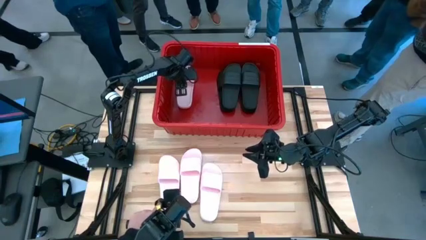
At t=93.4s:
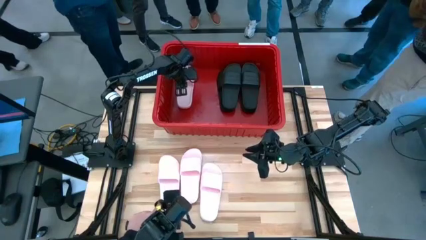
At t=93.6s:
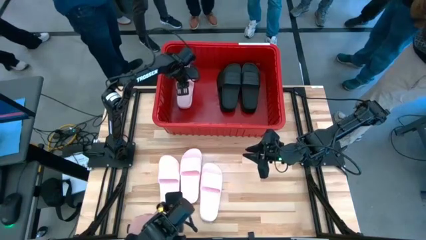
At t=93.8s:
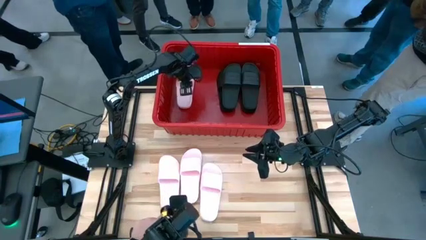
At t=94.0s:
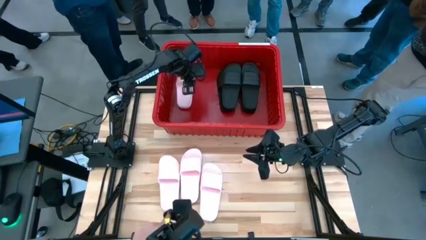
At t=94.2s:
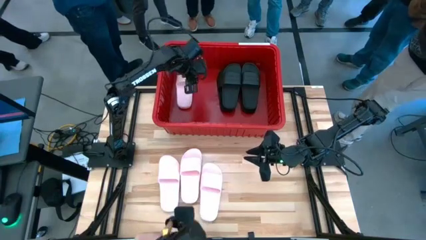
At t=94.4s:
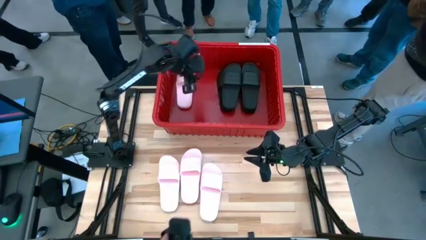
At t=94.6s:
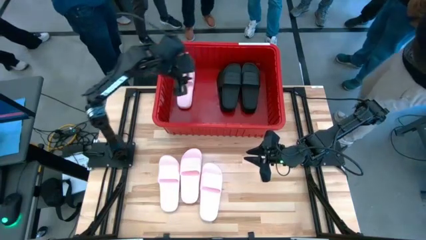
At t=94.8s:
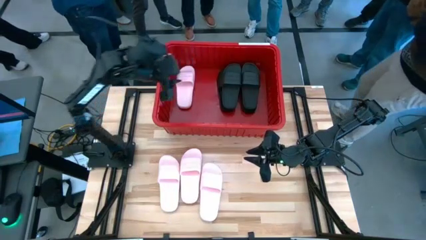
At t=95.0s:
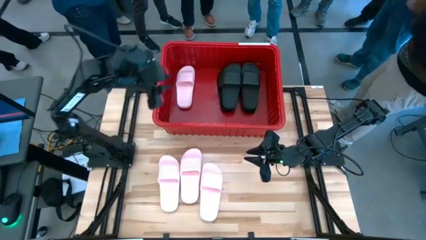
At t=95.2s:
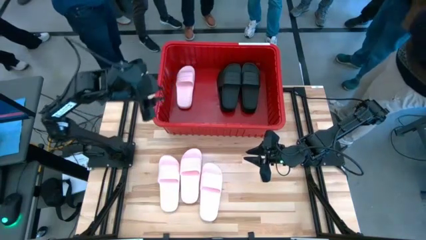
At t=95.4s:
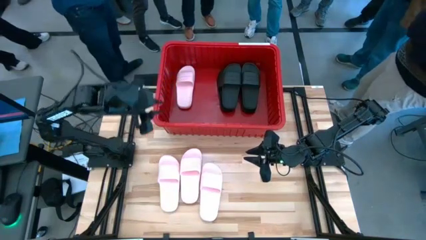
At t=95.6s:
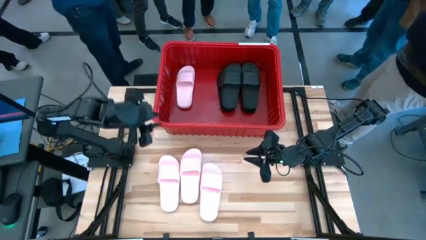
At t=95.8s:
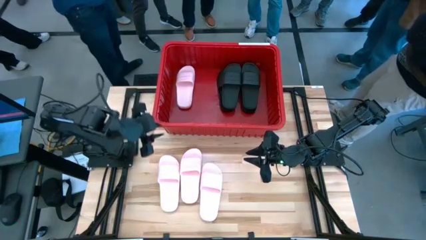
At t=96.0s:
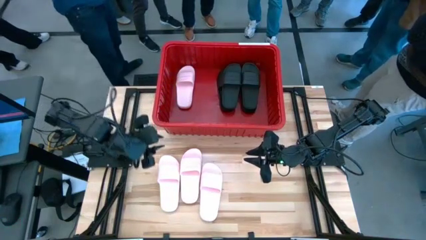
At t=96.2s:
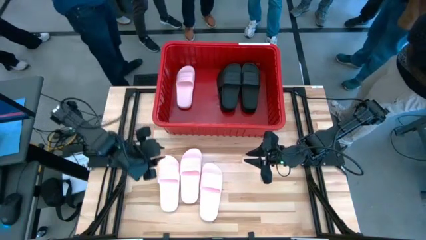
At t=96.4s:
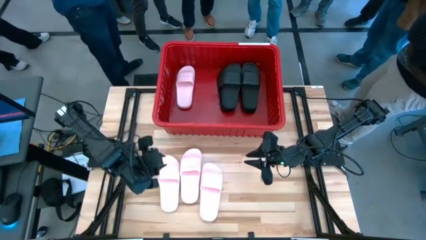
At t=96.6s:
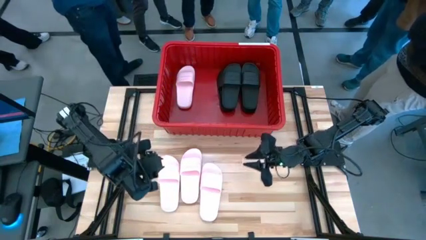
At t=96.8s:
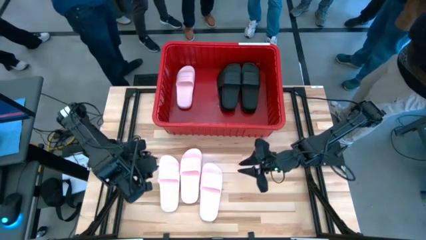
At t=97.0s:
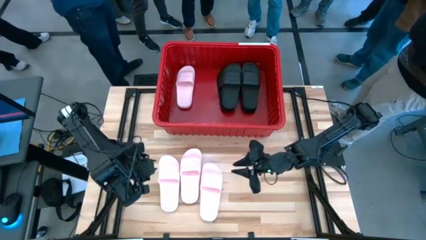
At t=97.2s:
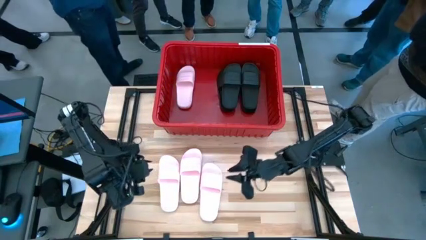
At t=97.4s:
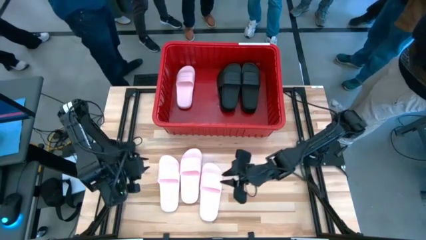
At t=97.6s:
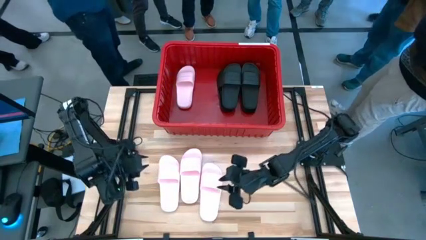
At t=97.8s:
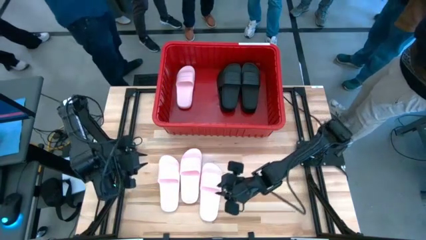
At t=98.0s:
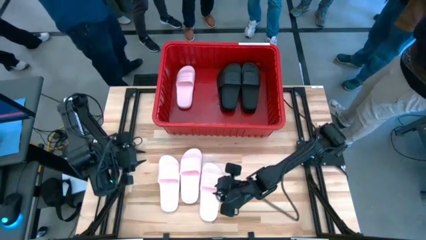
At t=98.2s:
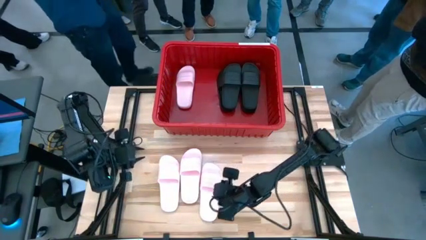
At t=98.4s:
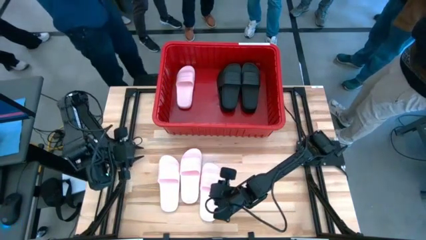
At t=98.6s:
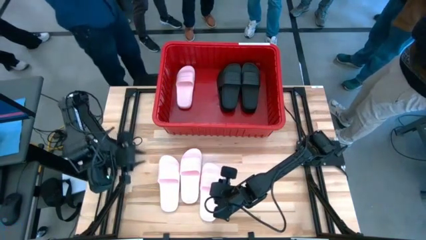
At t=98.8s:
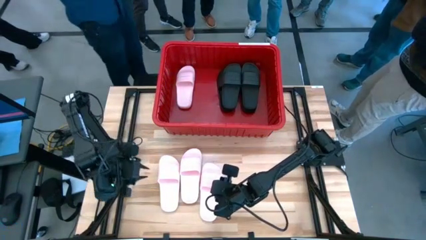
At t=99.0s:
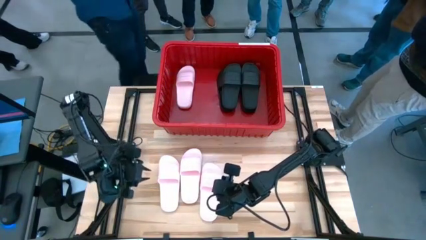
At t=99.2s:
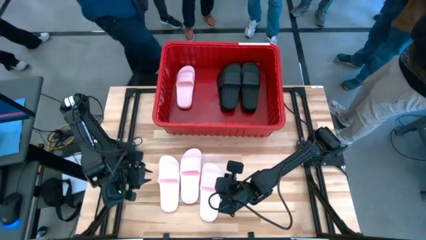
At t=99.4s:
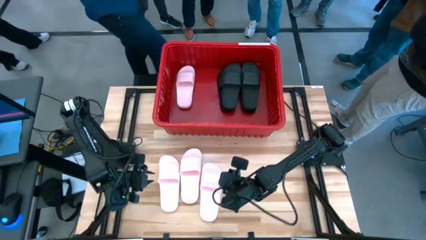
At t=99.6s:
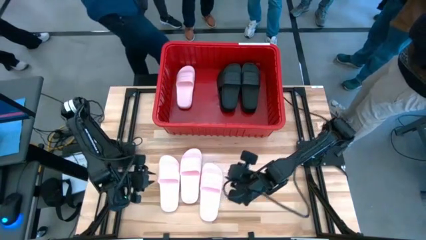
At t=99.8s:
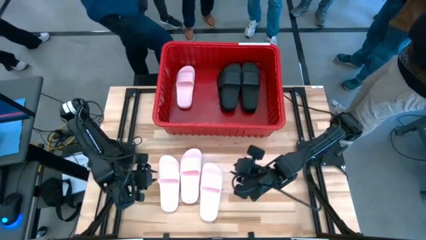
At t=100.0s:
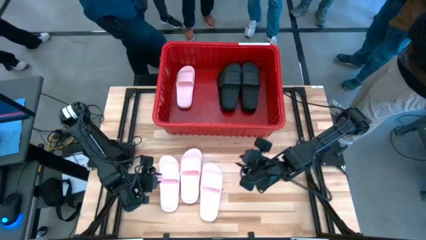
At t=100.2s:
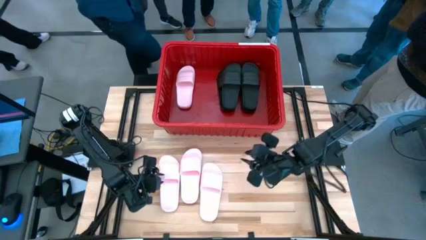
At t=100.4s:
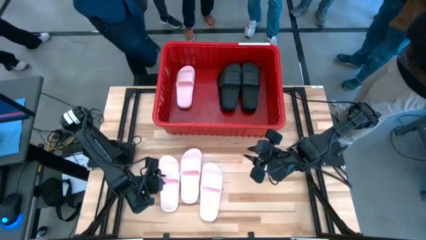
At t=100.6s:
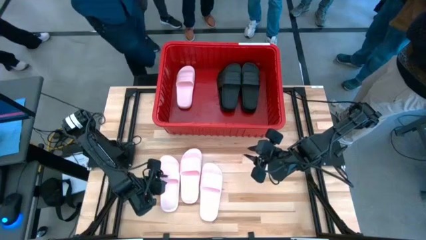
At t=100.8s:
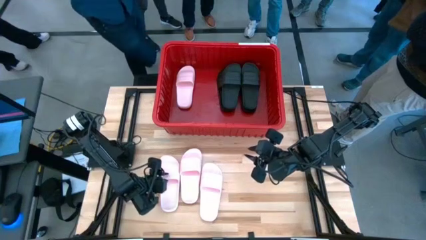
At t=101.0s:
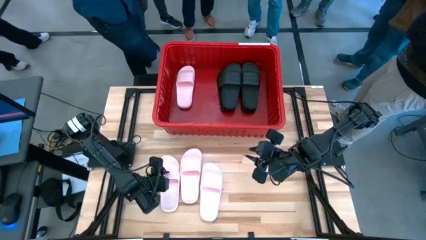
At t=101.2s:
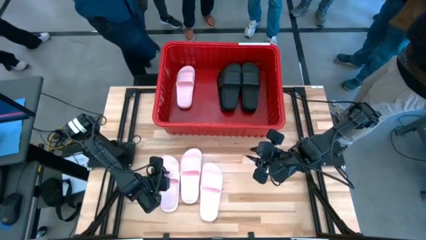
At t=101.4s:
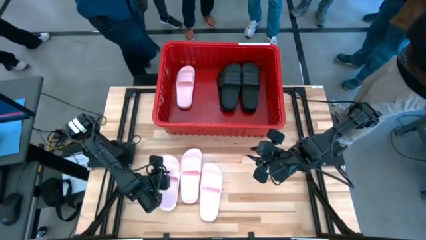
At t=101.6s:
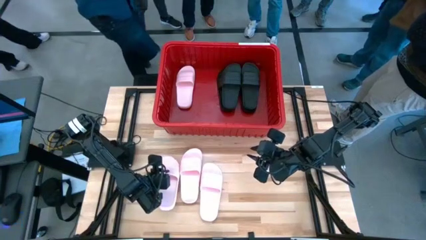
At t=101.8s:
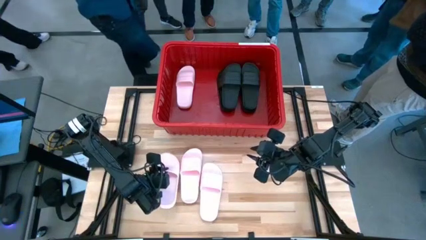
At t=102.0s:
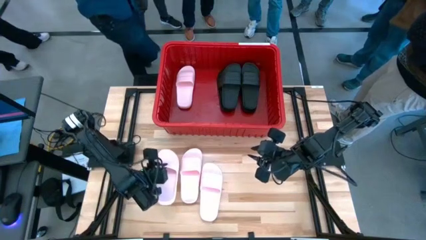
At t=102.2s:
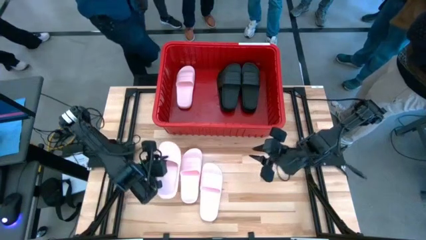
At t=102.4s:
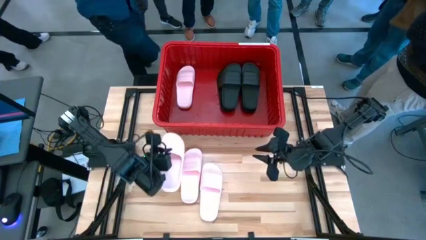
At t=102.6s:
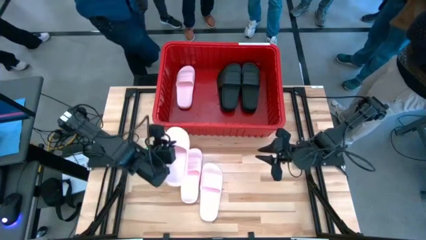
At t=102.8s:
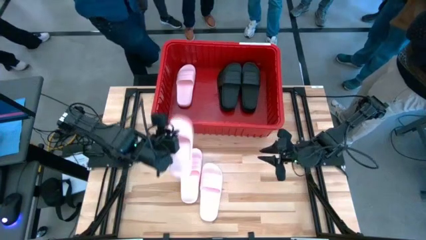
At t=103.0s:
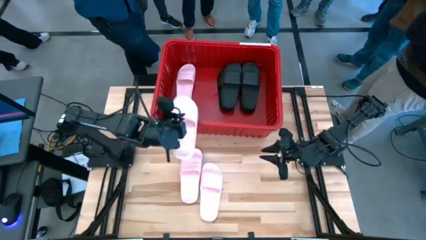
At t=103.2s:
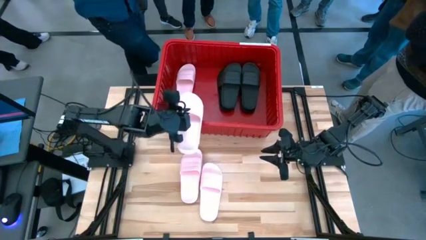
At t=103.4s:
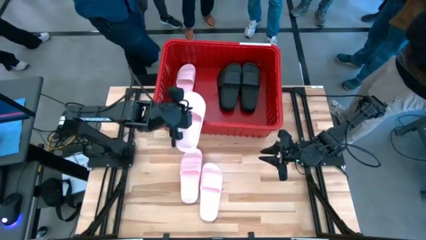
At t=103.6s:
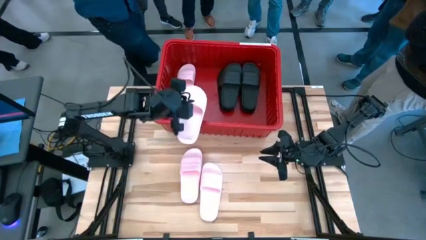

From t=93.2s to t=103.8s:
Task: Pick and place slides into bin
Put the pink slide into the red container

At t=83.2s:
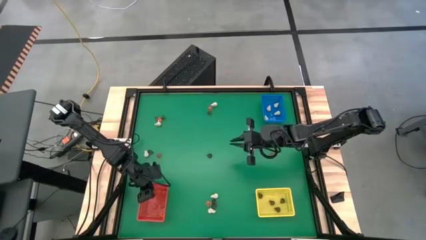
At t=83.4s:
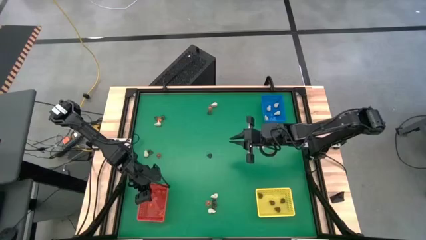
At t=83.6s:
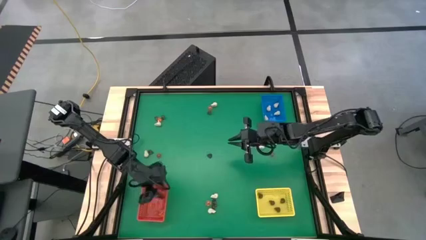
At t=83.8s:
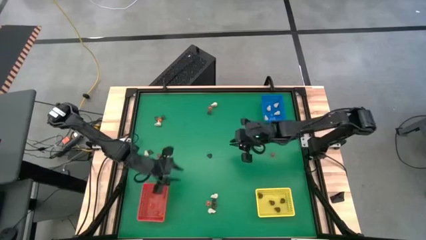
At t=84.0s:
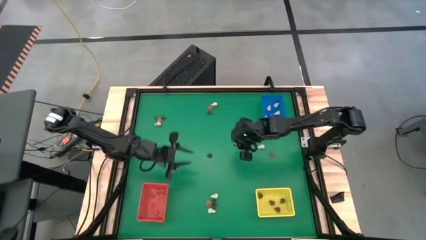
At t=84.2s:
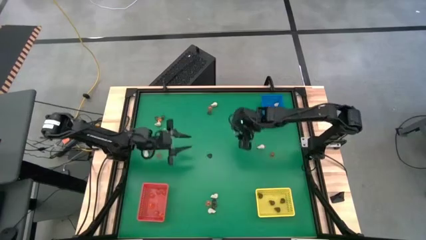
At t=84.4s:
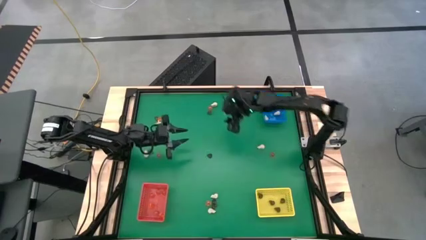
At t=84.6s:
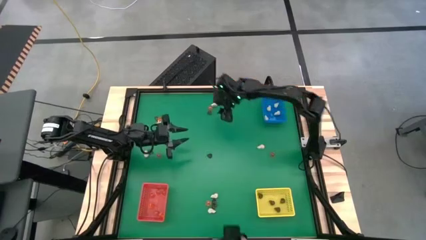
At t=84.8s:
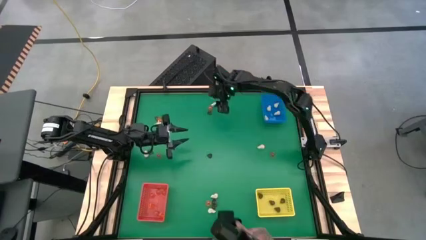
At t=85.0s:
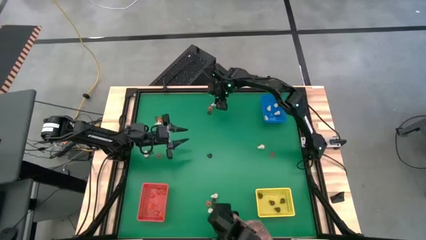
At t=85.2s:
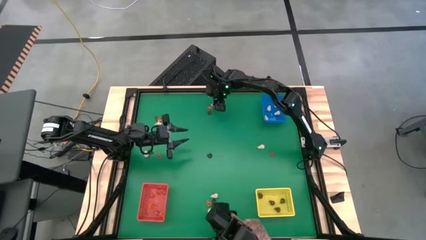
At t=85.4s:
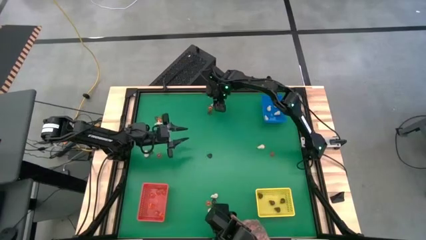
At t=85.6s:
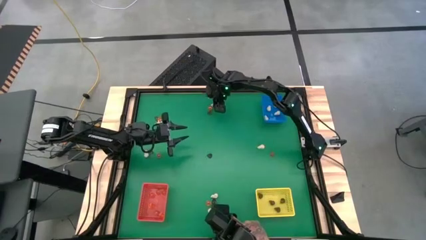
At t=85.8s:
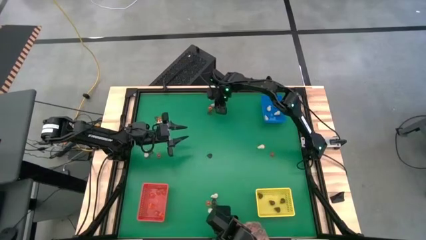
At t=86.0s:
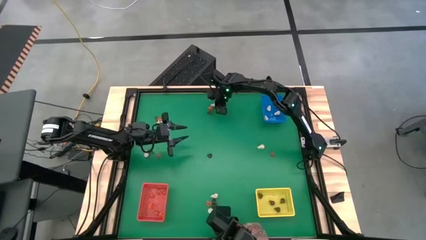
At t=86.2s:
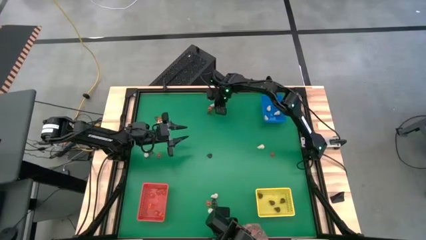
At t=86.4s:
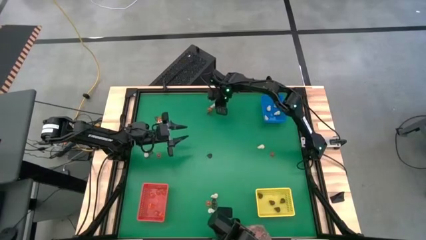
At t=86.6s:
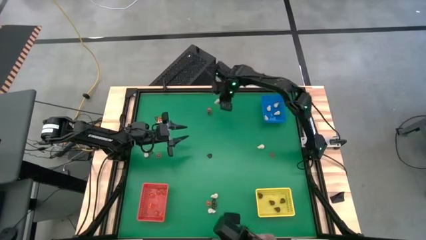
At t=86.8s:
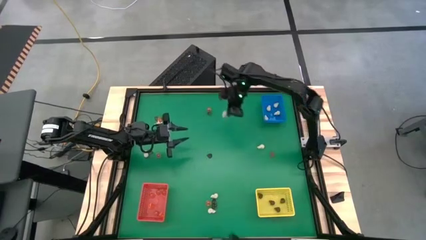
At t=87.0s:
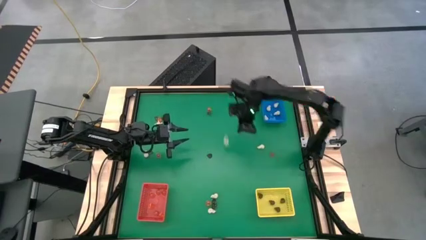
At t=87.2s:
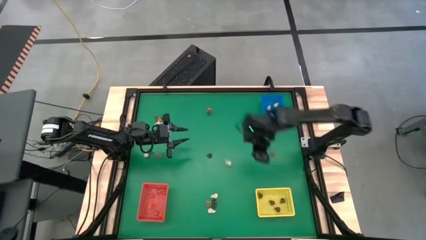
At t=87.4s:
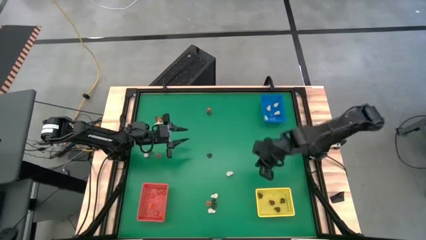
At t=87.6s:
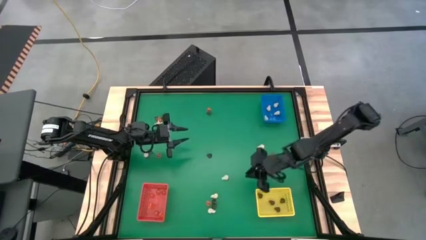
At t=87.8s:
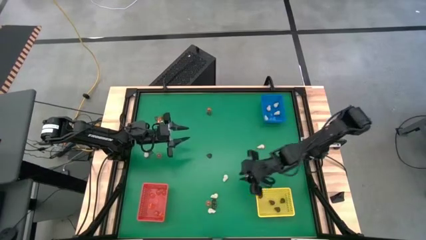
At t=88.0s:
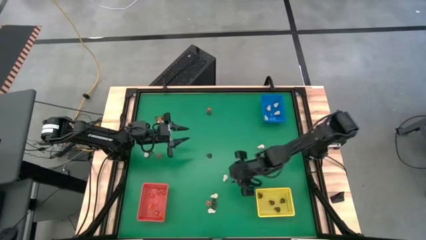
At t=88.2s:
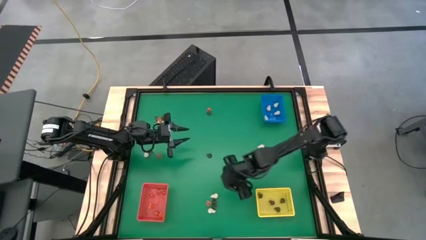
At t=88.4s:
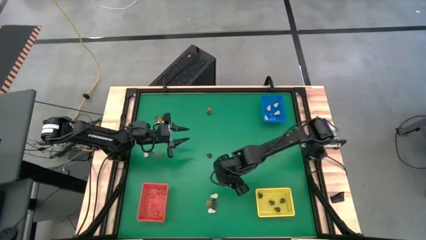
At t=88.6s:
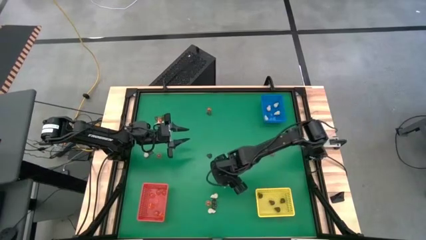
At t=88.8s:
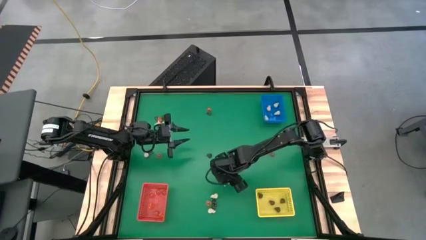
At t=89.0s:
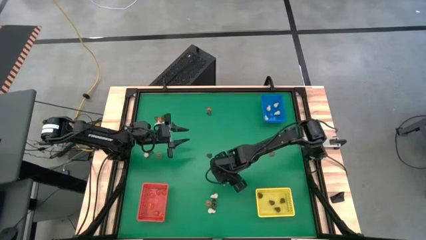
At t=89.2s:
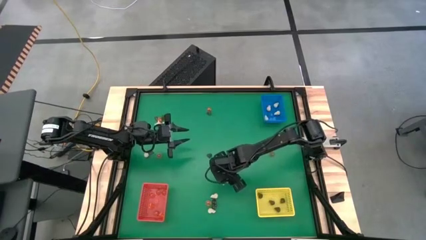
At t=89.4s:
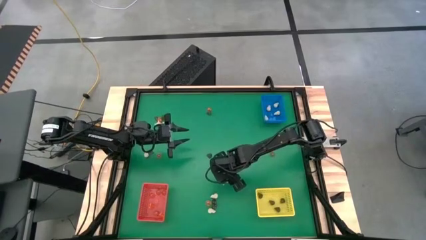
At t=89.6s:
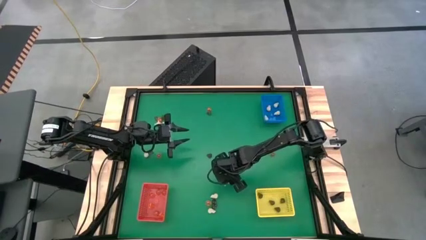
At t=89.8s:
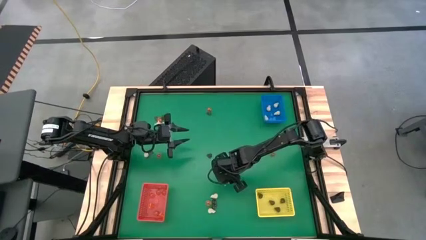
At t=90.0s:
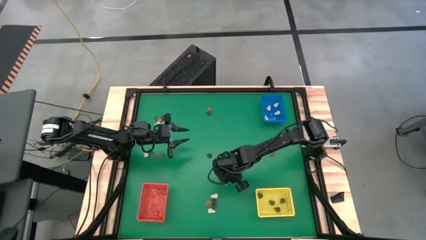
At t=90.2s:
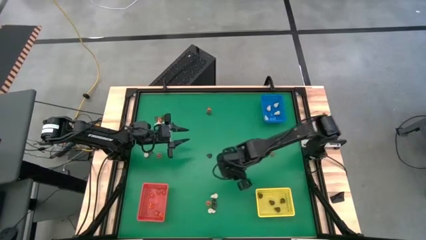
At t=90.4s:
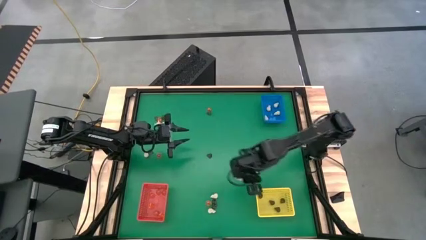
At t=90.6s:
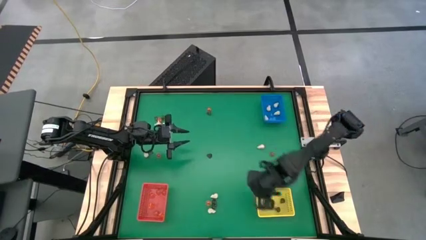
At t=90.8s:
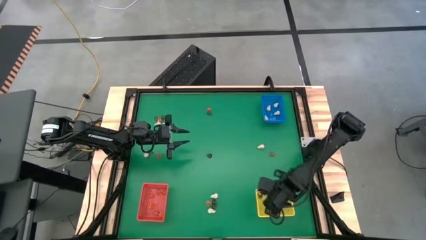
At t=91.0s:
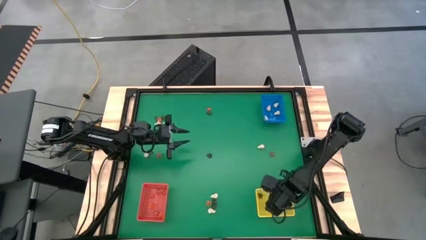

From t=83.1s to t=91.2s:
Task: Sort Halloween decoration
Put the white skull toy into the blue bin
